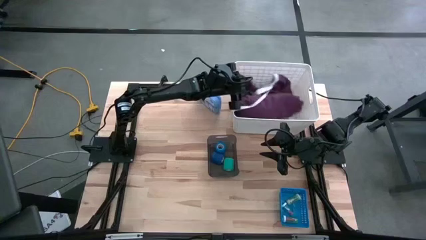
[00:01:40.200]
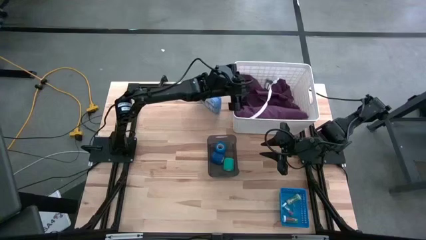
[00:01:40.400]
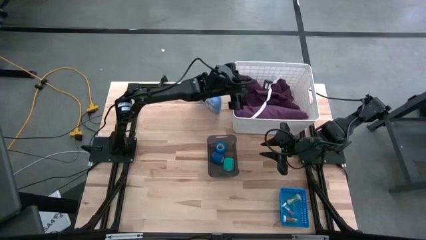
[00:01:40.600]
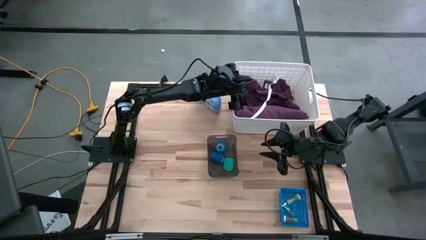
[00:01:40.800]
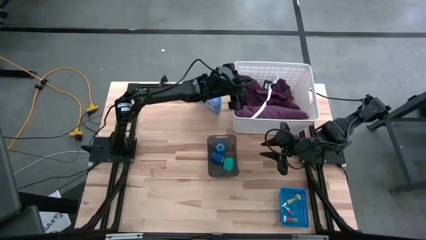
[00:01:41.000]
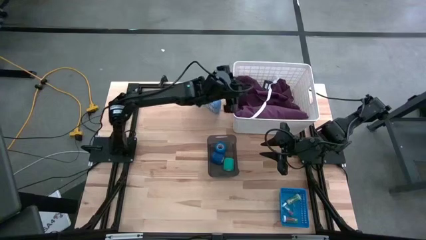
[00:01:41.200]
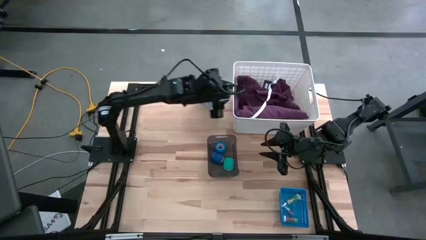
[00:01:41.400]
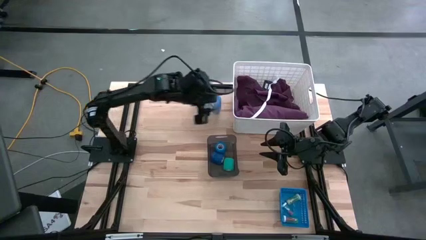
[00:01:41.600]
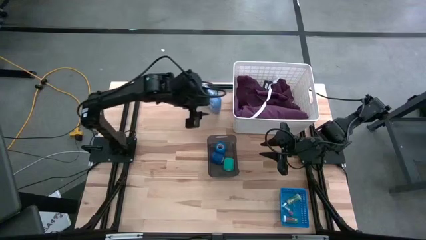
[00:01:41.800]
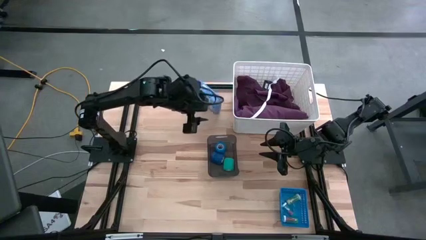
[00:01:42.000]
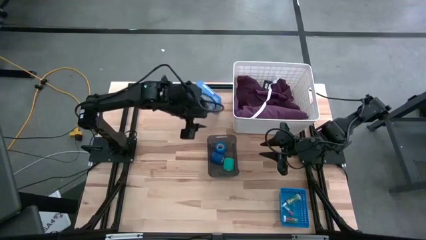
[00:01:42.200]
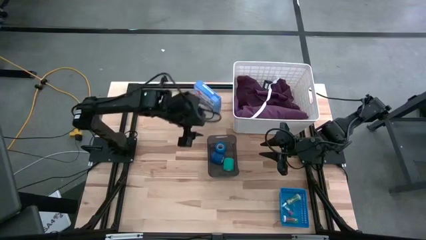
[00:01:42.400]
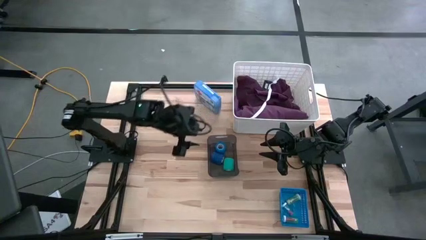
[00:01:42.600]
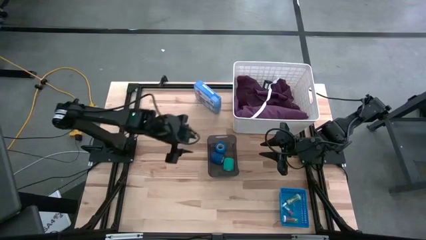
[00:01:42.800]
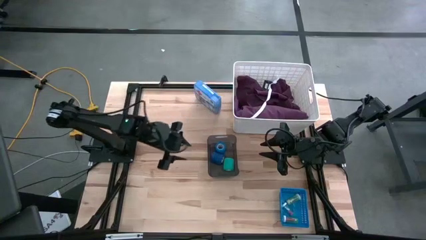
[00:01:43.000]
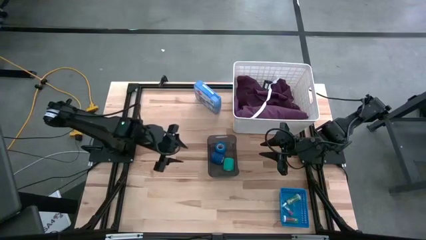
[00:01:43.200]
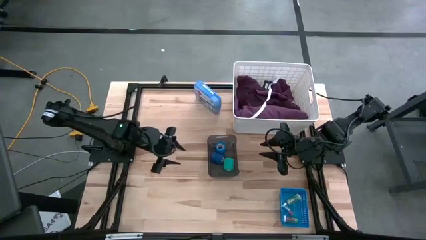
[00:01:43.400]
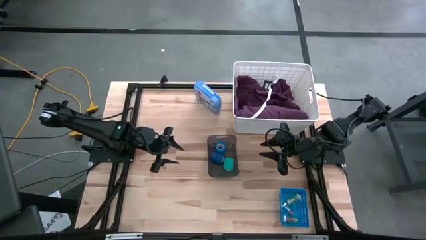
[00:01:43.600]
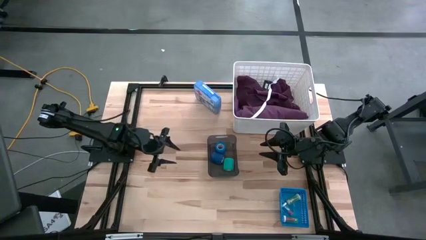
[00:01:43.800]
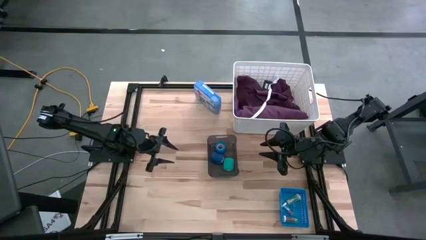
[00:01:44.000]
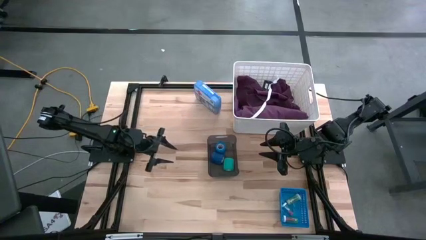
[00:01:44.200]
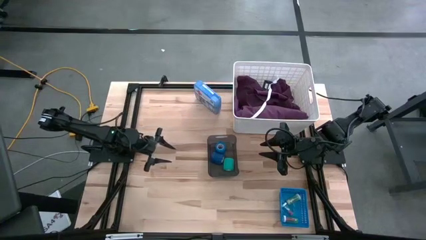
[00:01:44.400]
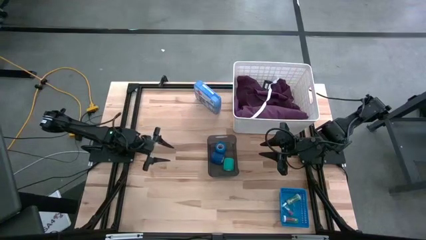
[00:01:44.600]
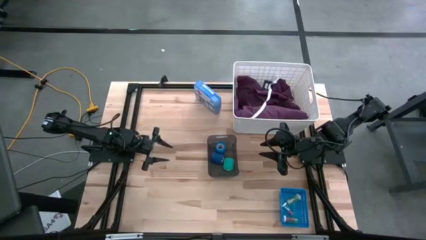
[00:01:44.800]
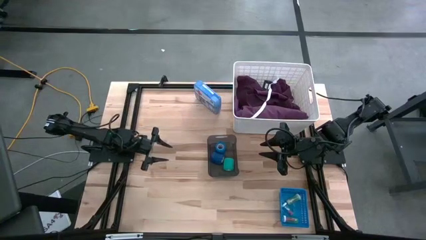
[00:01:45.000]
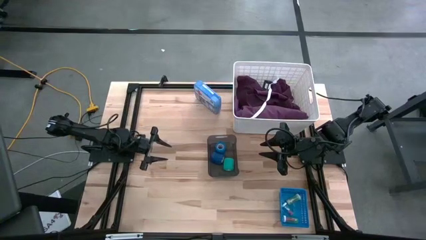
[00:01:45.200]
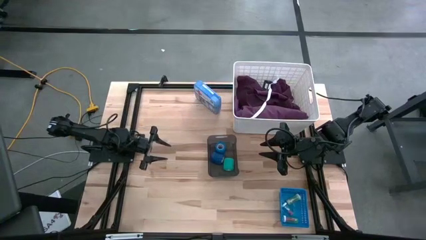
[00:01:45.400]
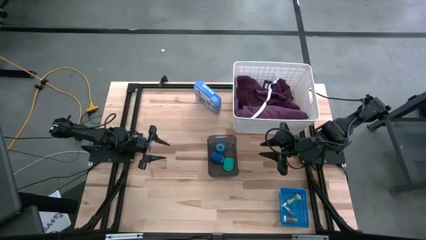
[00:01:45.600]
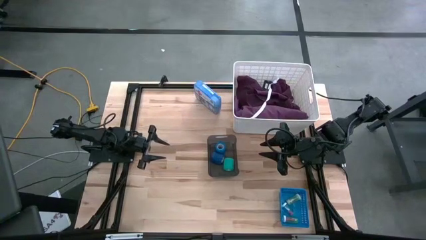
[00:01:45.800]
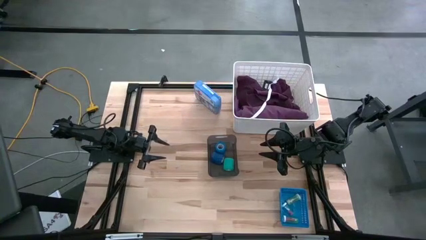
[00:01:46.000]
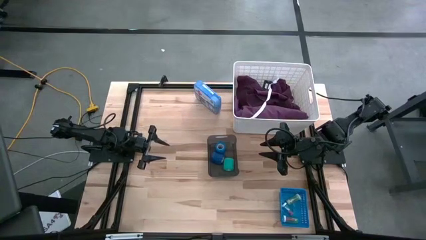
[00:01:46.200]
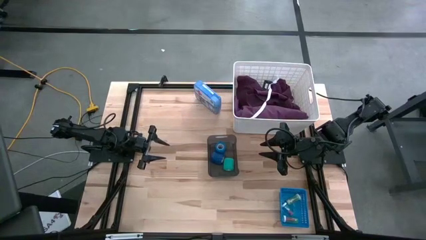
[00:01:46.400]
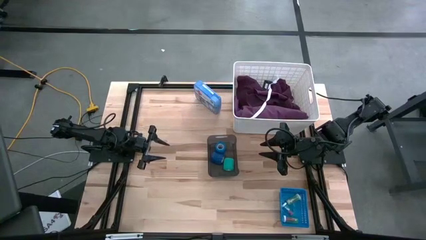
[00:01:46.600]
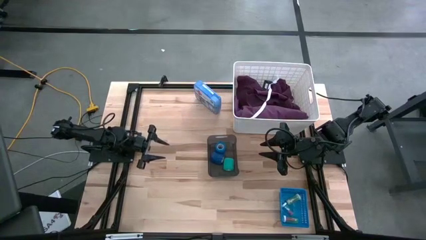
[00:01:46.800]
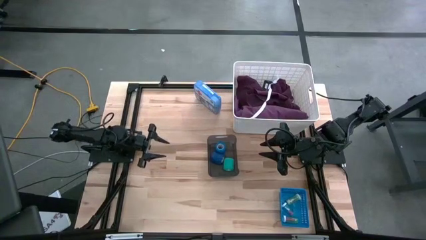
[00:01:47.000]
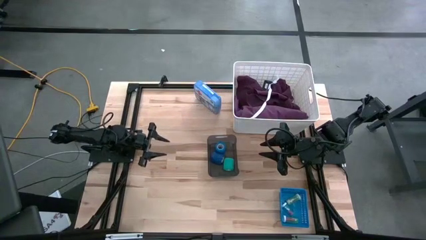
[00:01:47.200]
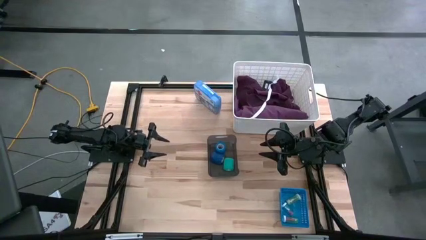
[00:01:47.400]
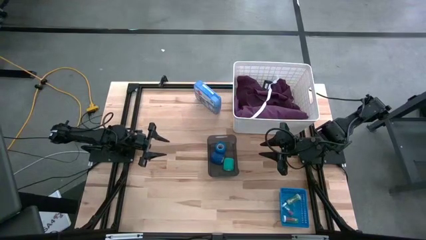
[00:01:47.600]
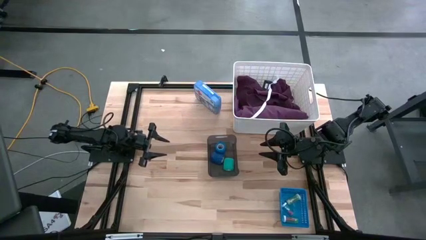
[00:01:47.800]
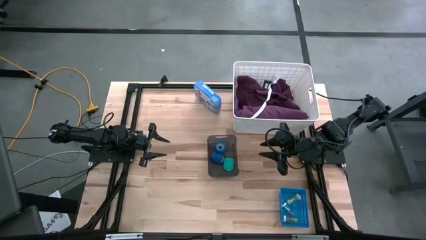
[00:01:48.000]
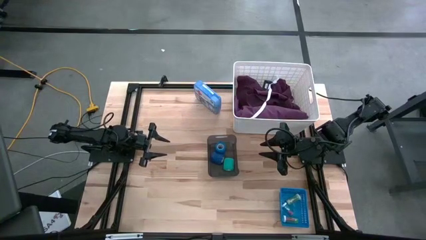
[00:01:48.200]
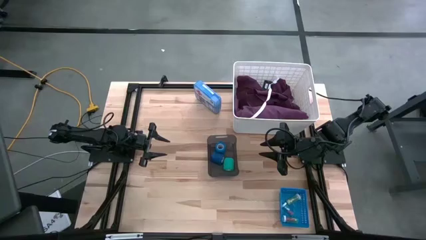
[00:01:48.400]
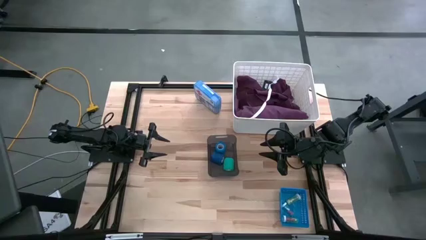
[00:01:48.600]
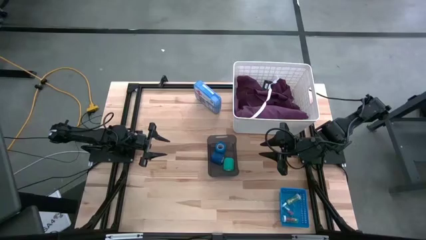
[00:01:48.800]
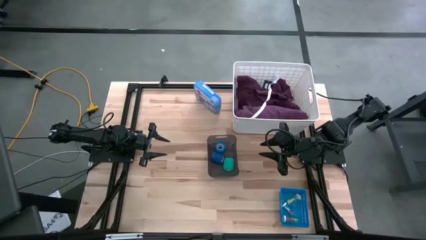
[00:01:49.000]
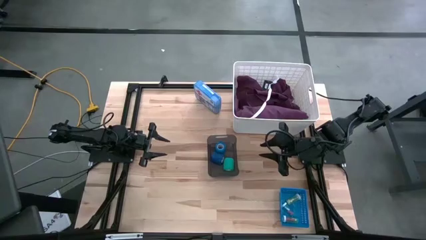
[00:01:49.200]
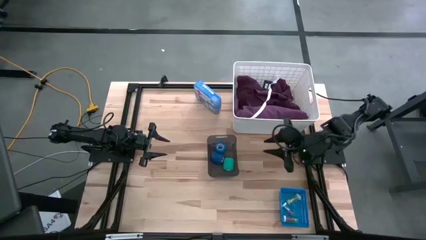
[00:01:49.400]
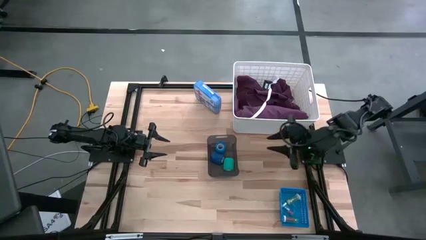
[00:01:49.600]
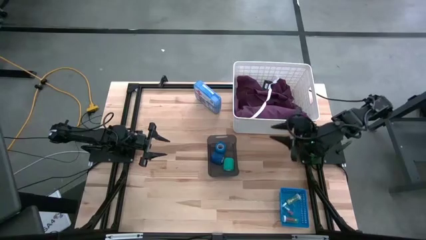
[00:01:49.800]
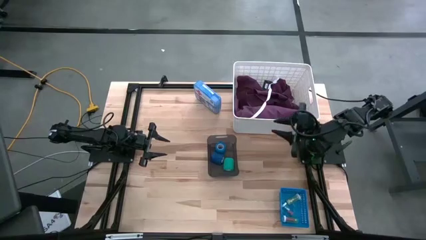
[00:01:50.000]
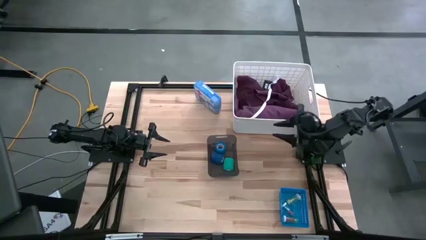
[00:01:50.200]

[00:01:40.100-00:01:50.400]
Task: Pick & Place Medicine items
Return to Home Position
